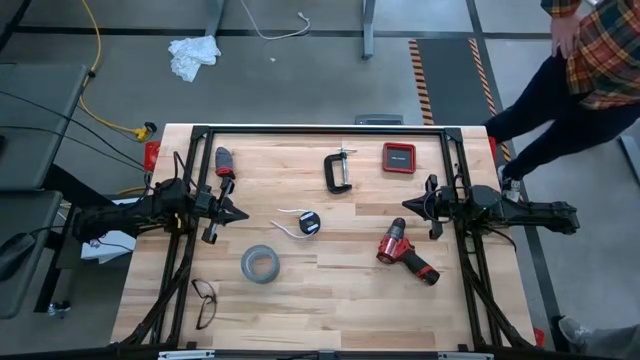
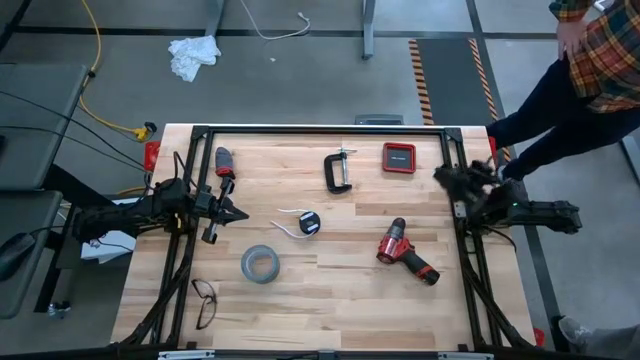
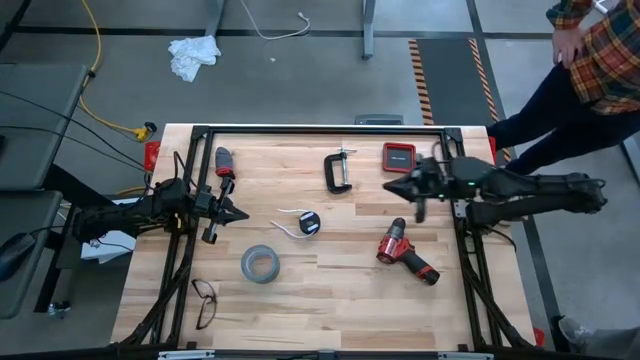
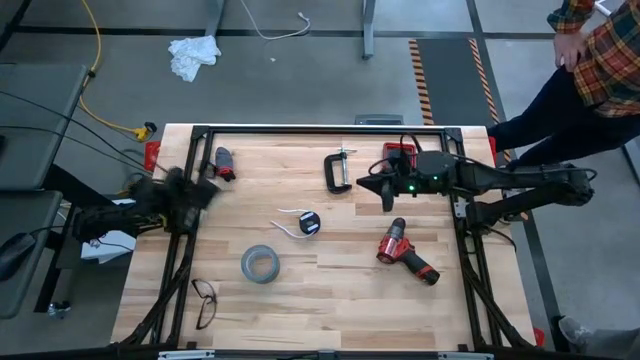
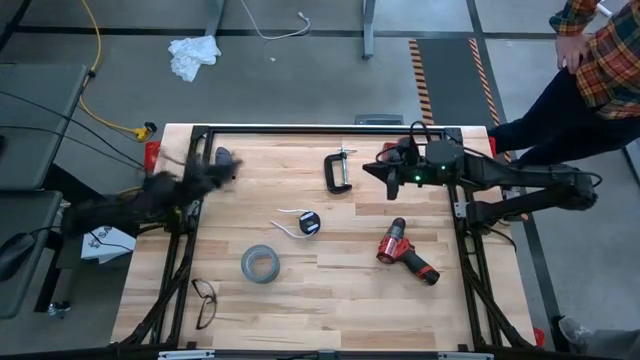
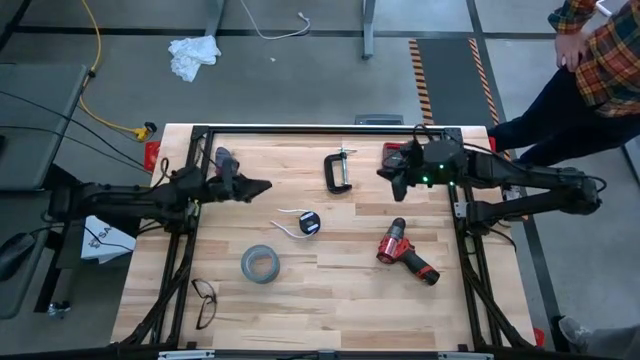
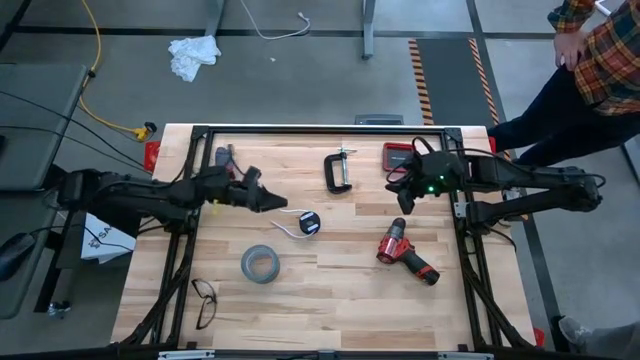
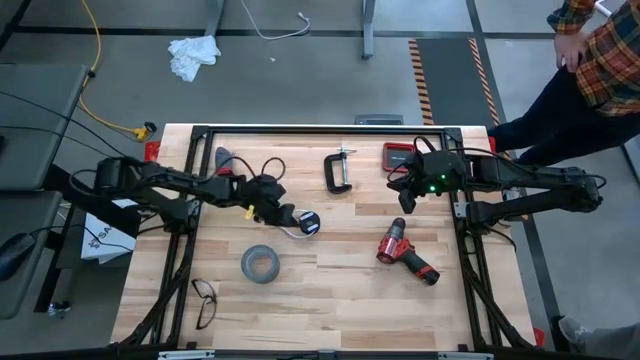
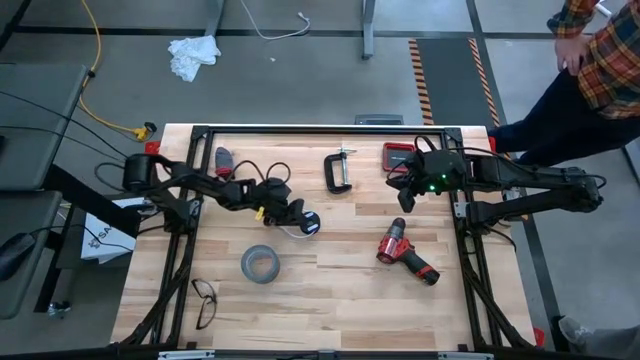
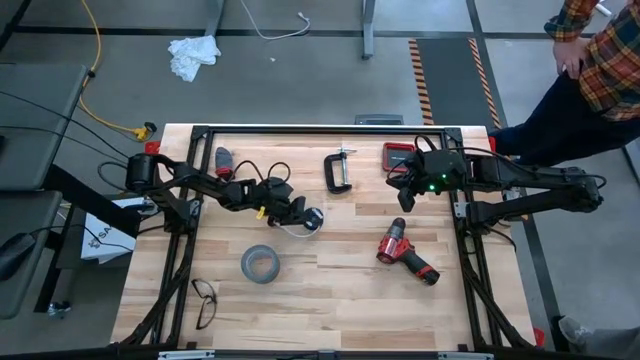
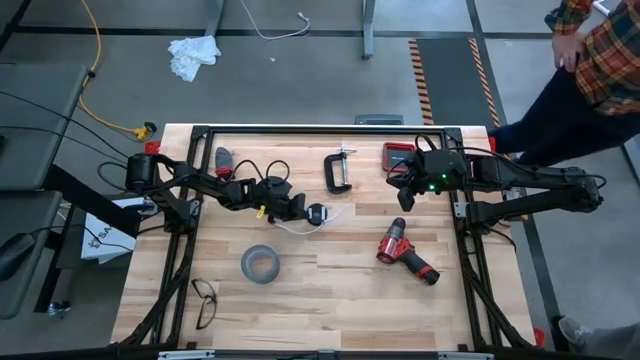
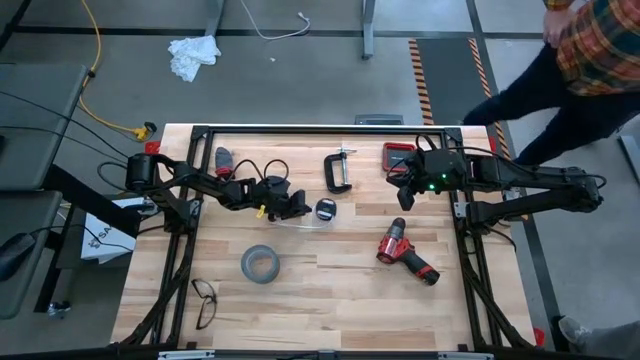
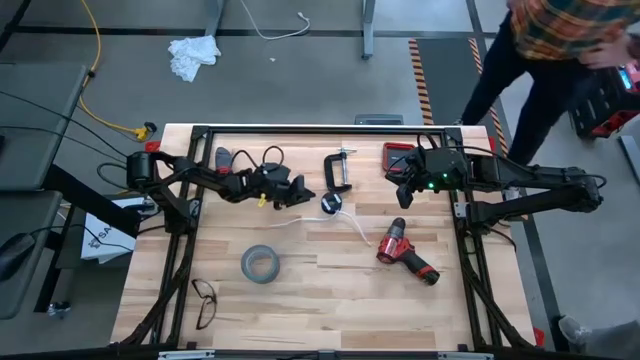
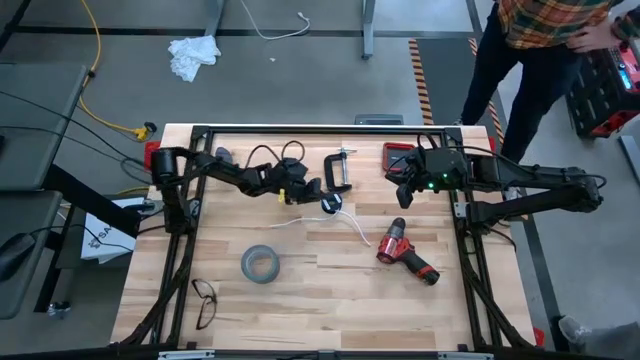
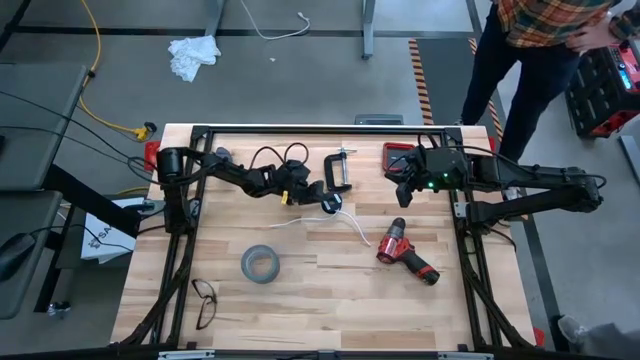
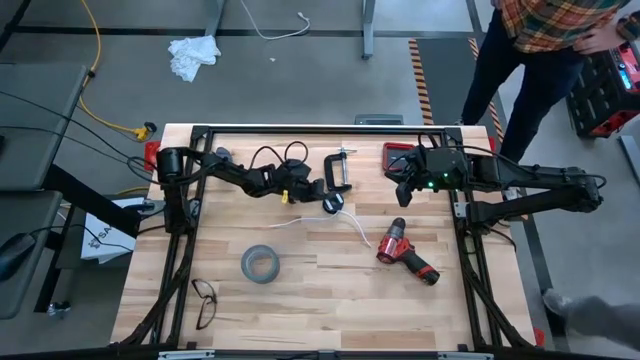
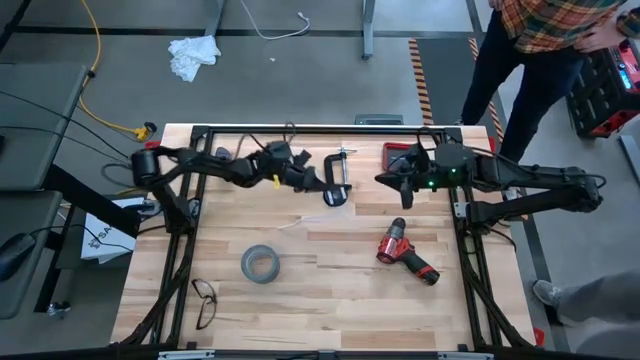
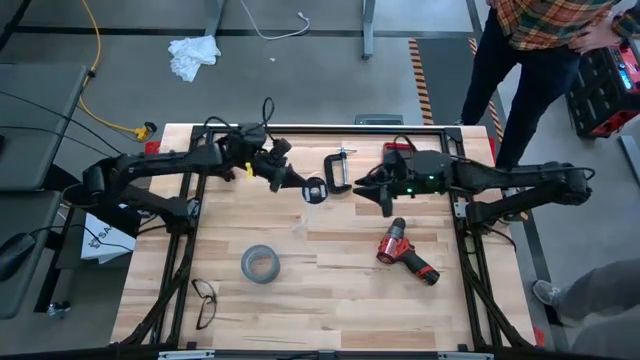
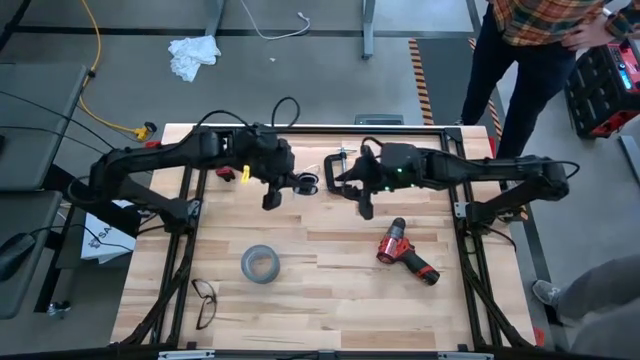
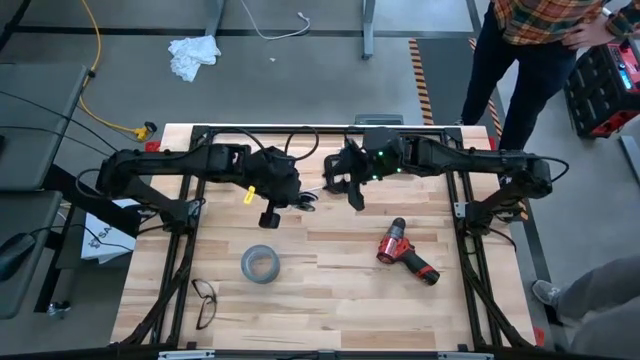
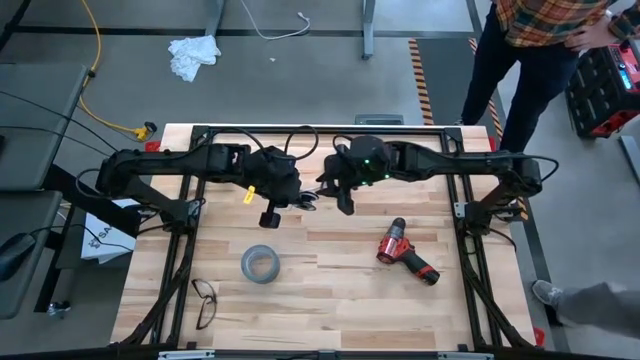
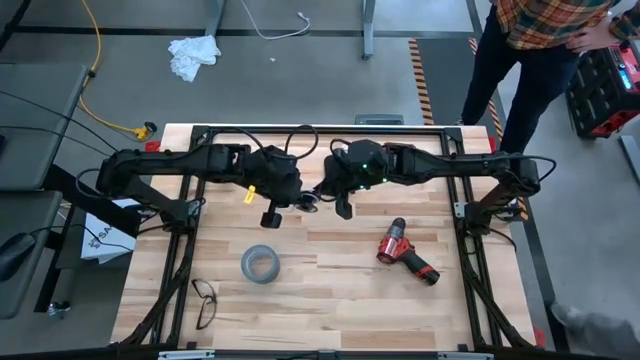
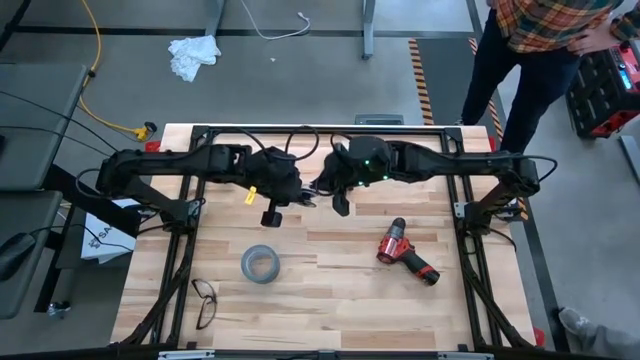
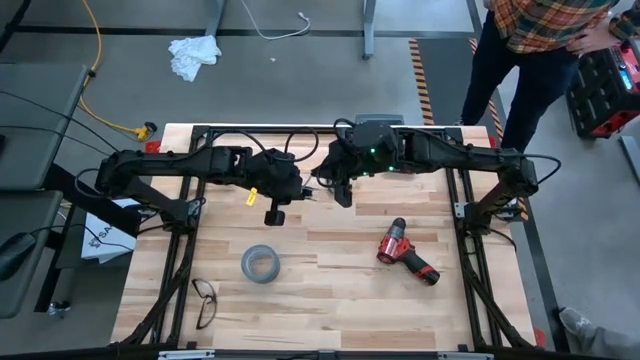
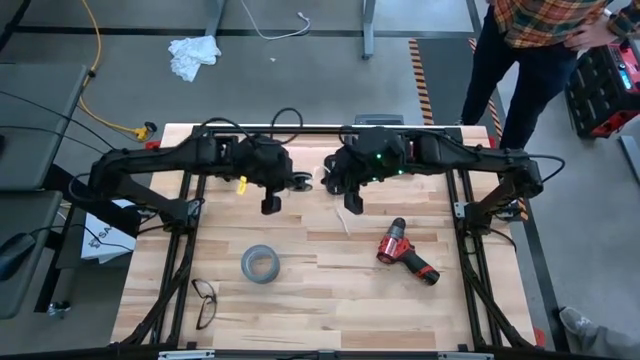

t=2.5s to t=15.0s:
Task: Coil cords
Uncoil the white wire

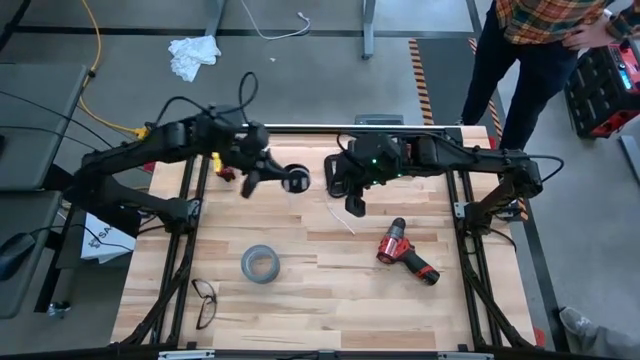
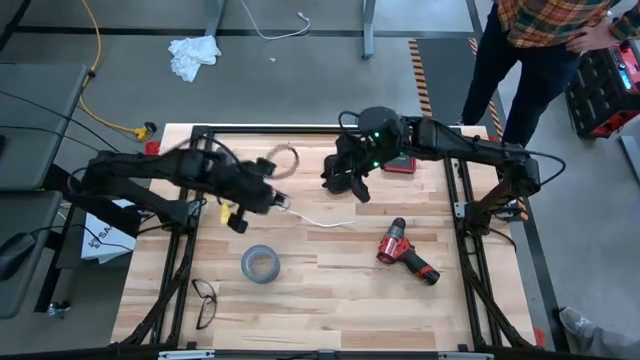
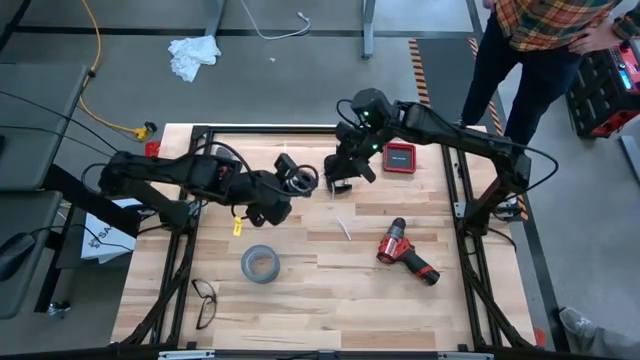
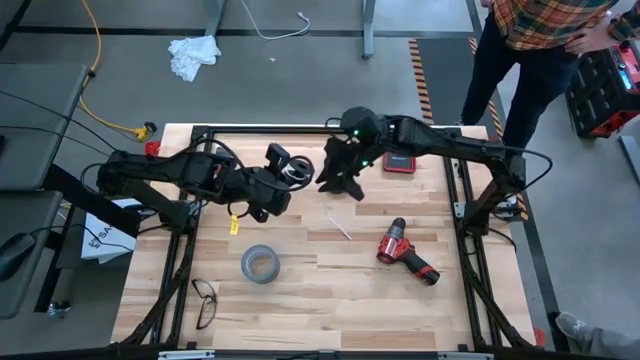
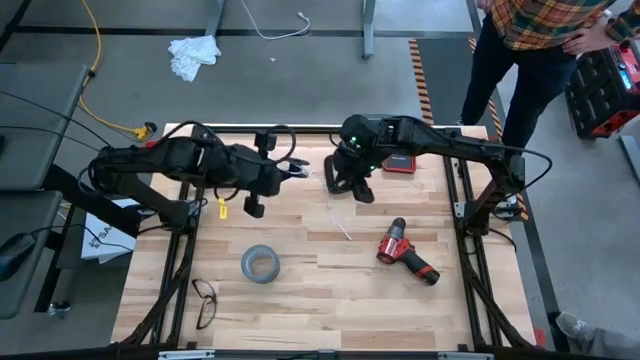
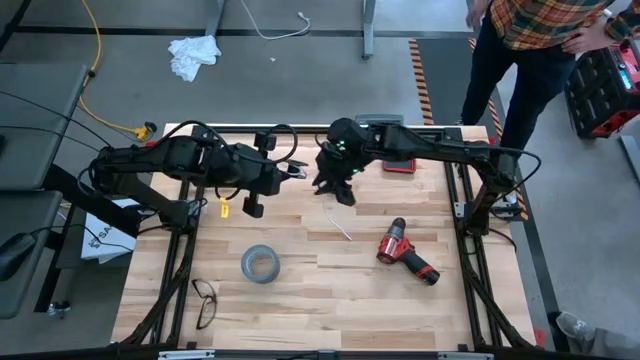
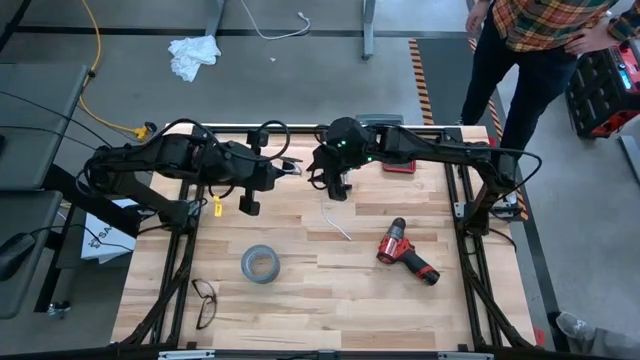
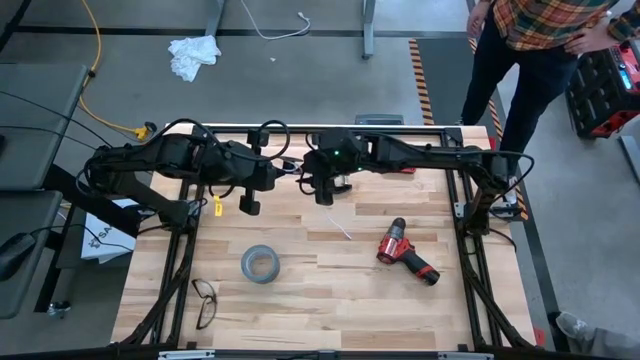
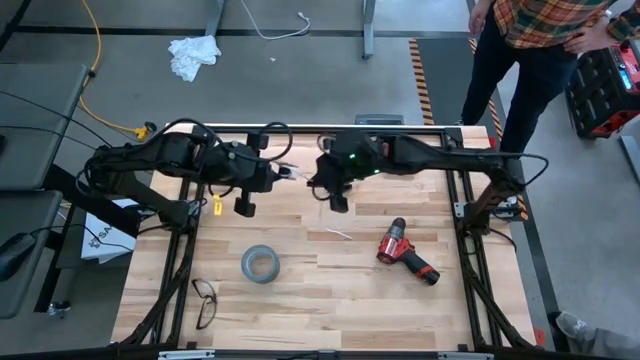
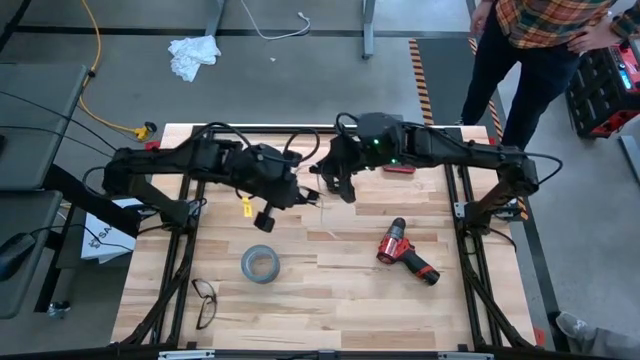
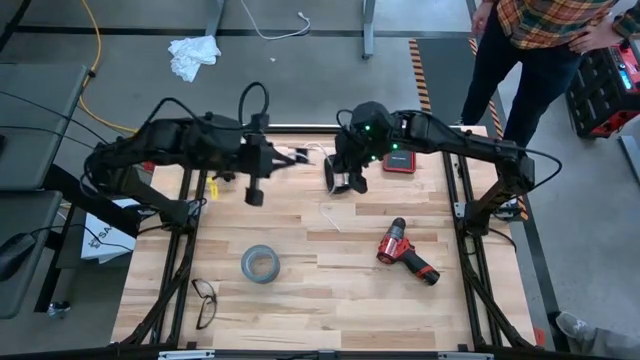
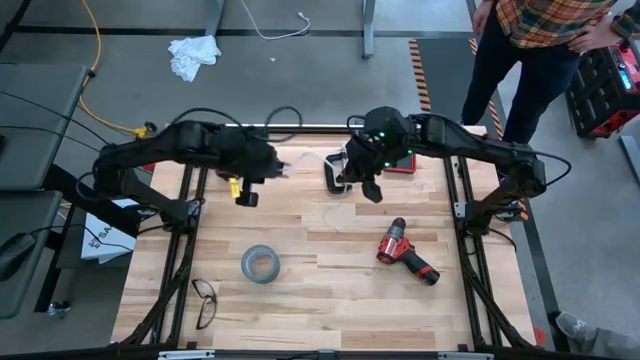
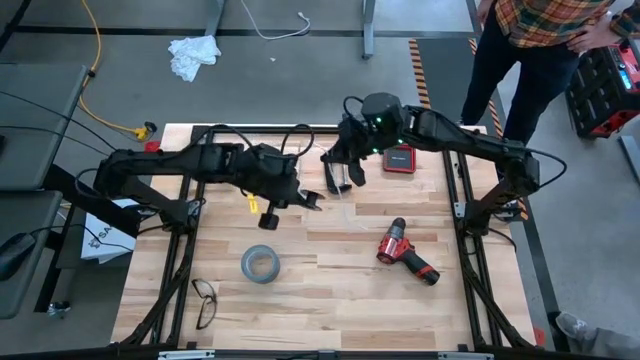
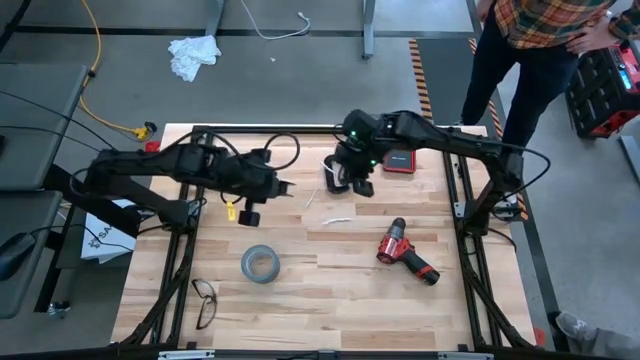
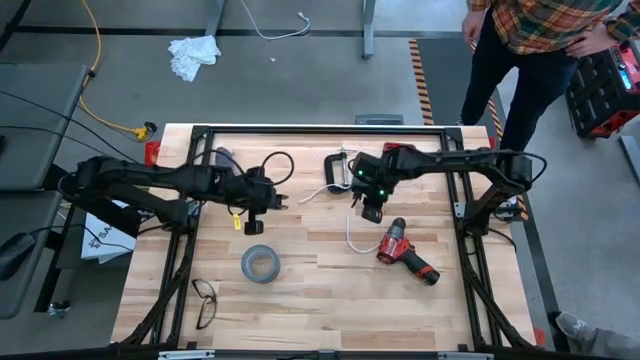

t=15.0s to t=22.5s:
Uncoil the white wire
